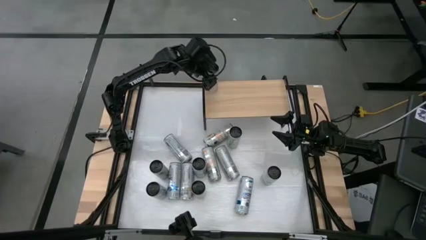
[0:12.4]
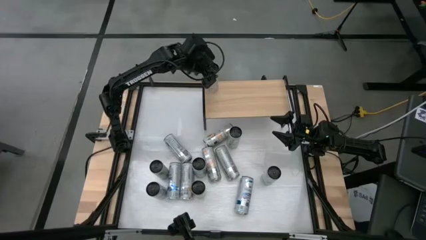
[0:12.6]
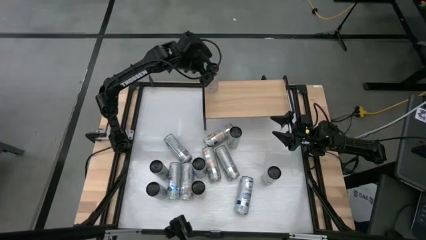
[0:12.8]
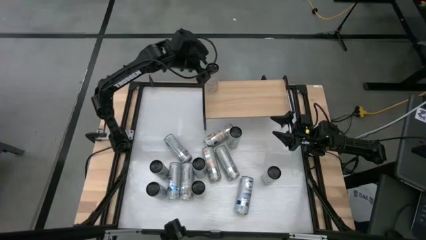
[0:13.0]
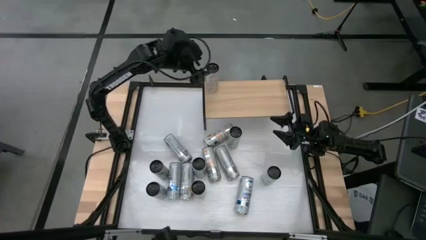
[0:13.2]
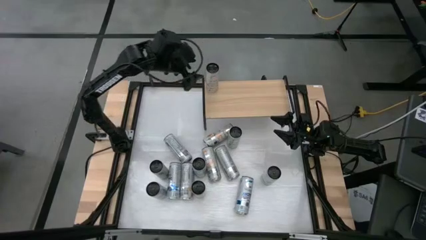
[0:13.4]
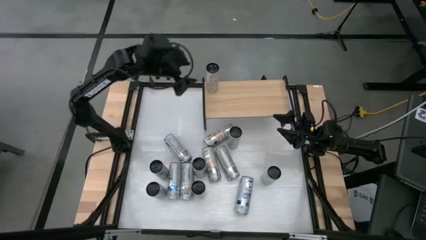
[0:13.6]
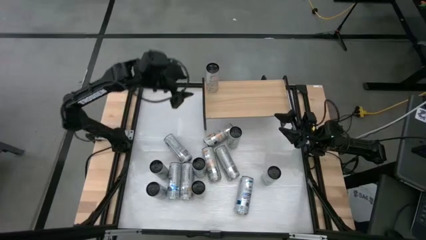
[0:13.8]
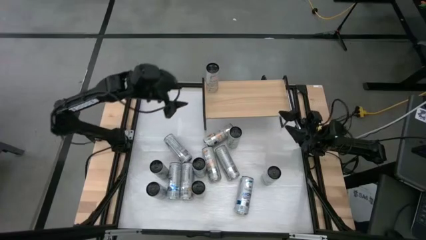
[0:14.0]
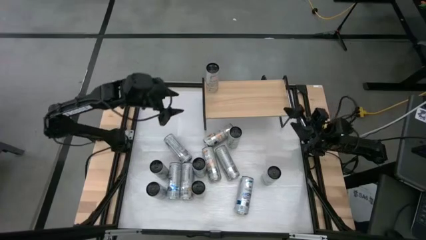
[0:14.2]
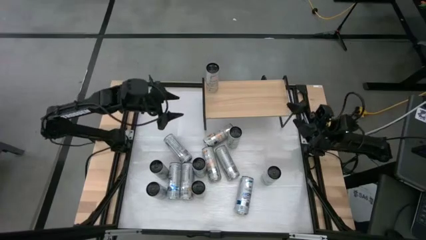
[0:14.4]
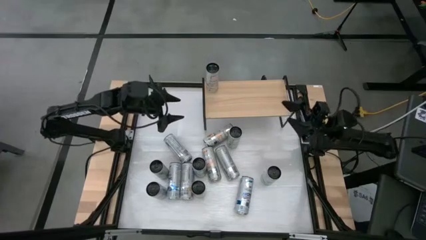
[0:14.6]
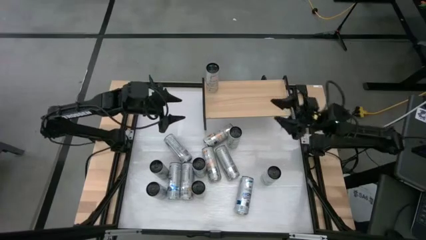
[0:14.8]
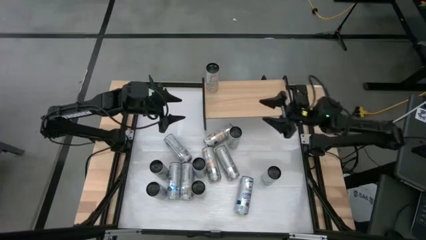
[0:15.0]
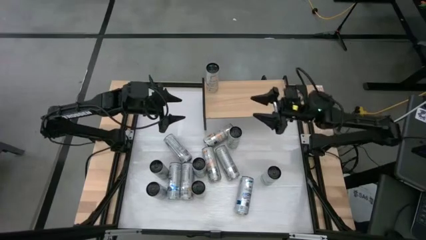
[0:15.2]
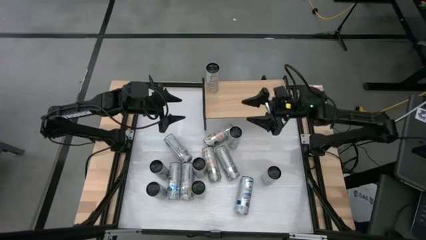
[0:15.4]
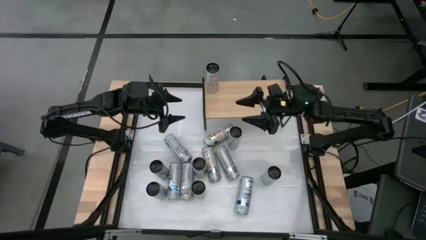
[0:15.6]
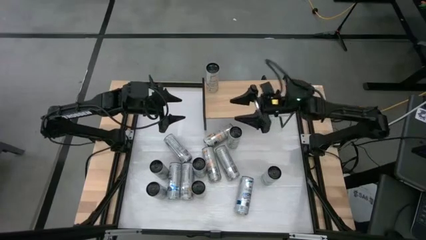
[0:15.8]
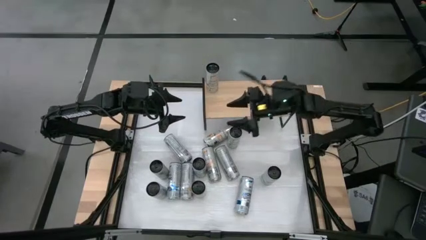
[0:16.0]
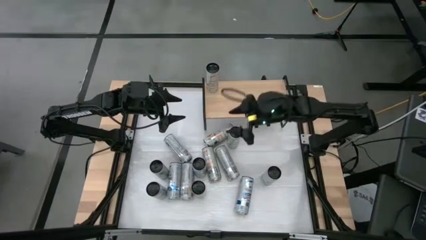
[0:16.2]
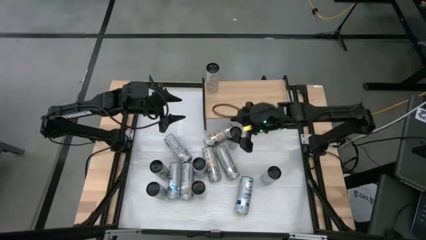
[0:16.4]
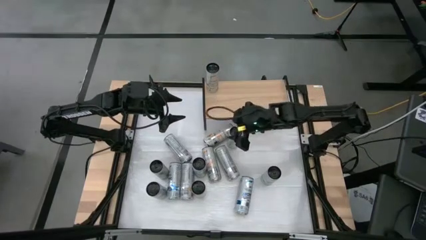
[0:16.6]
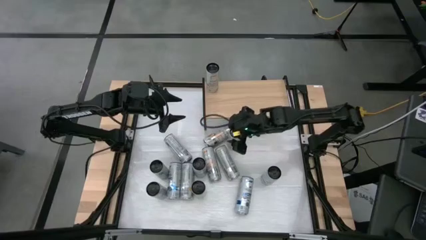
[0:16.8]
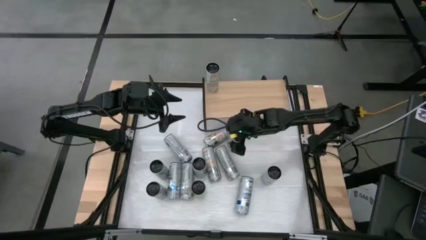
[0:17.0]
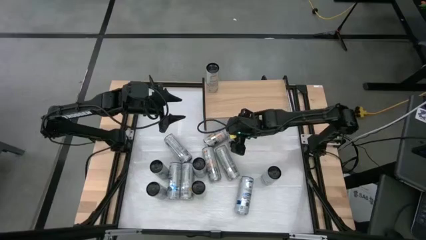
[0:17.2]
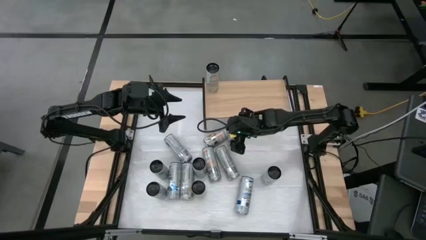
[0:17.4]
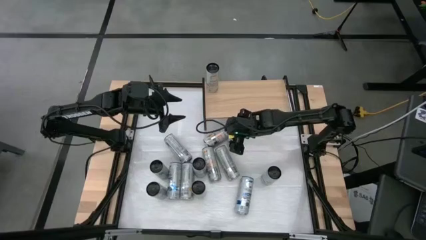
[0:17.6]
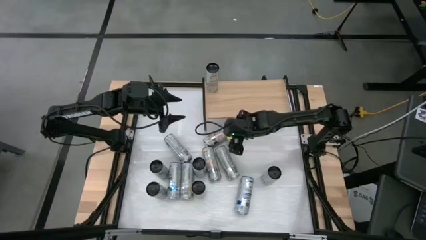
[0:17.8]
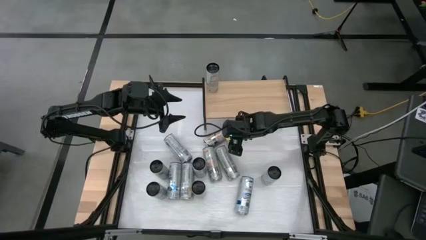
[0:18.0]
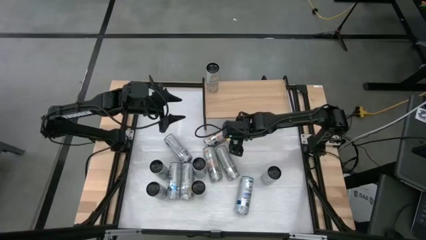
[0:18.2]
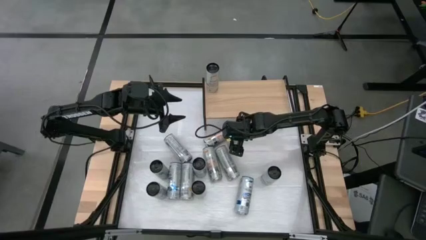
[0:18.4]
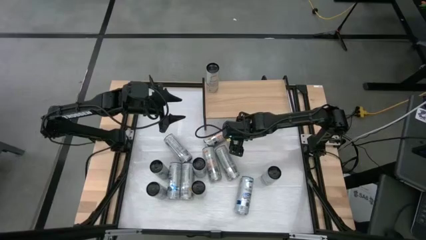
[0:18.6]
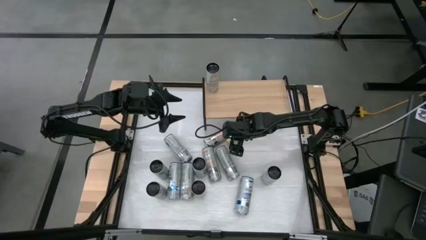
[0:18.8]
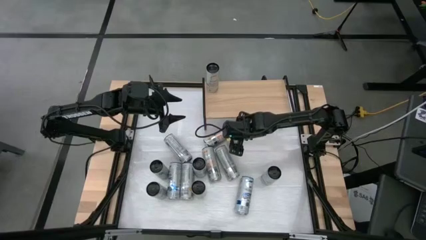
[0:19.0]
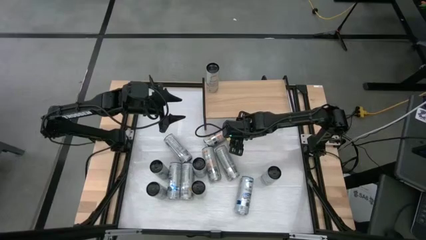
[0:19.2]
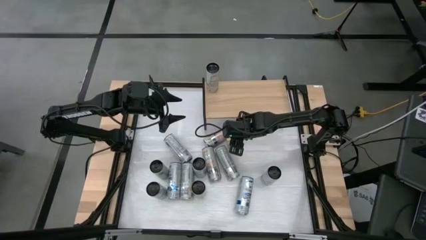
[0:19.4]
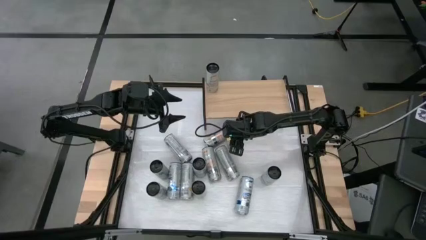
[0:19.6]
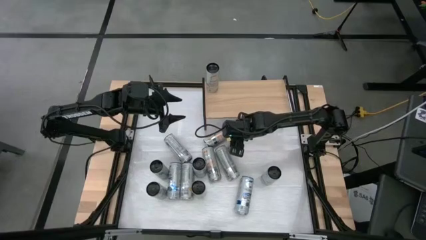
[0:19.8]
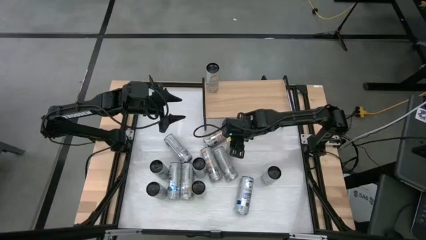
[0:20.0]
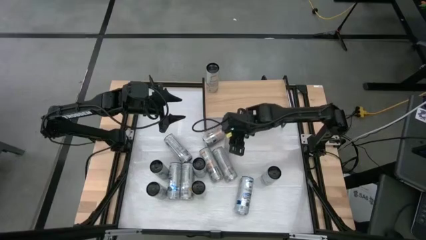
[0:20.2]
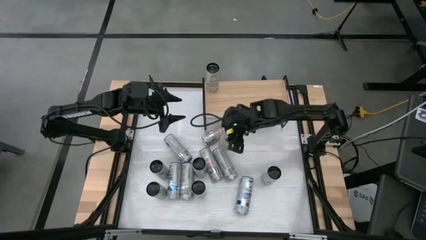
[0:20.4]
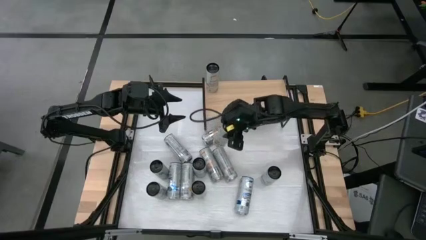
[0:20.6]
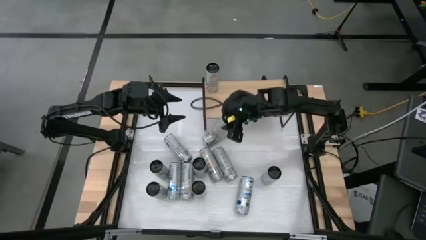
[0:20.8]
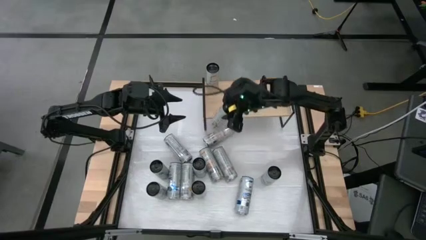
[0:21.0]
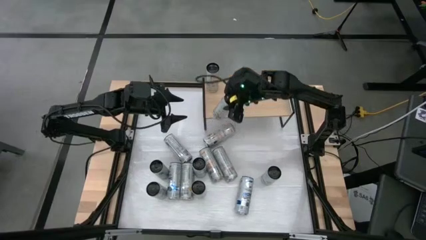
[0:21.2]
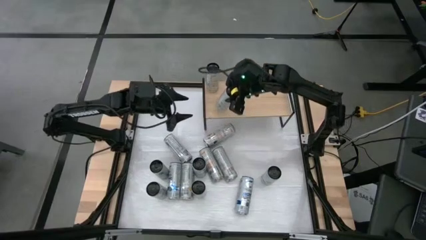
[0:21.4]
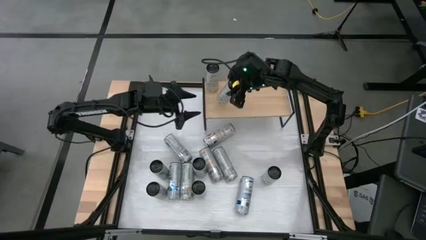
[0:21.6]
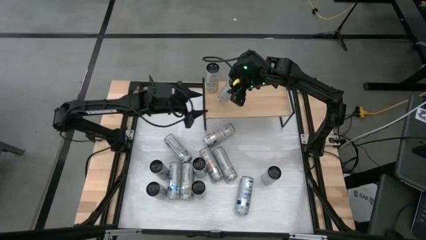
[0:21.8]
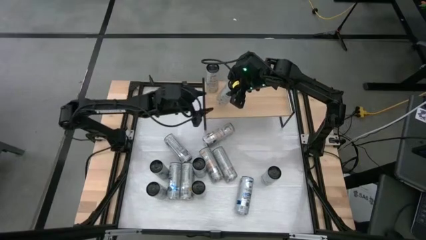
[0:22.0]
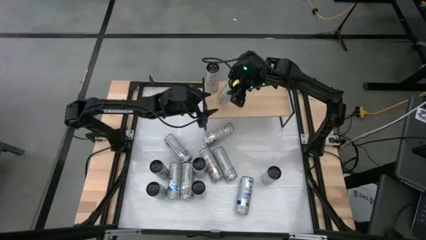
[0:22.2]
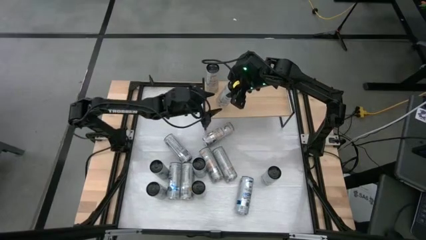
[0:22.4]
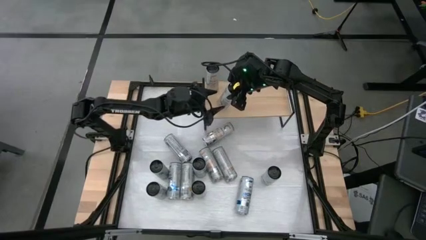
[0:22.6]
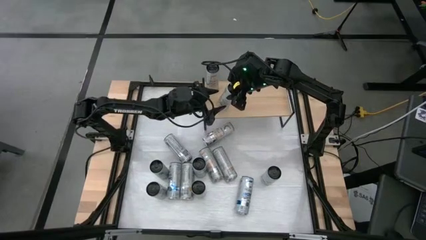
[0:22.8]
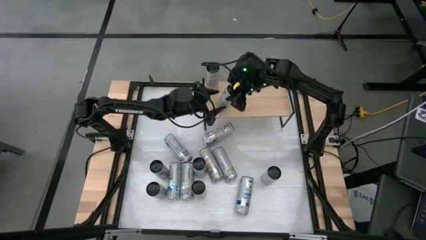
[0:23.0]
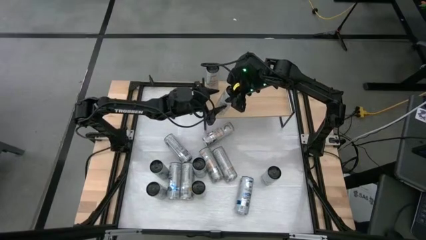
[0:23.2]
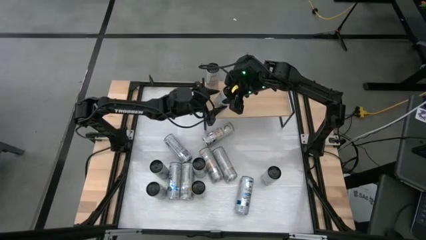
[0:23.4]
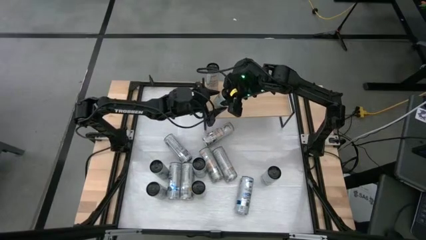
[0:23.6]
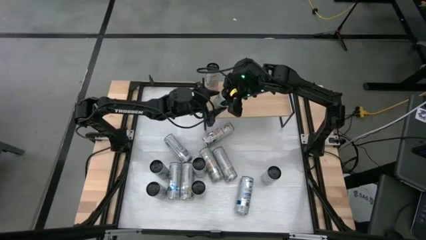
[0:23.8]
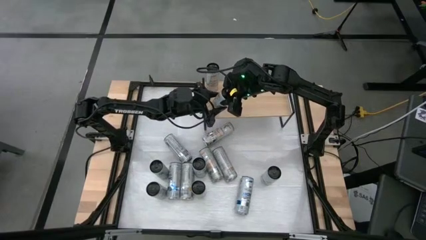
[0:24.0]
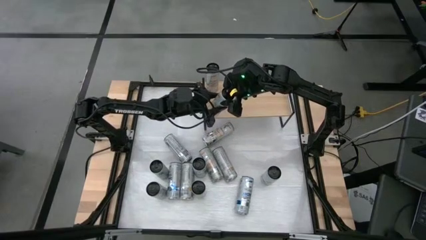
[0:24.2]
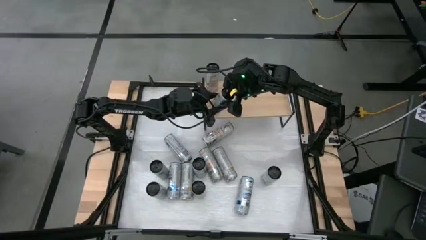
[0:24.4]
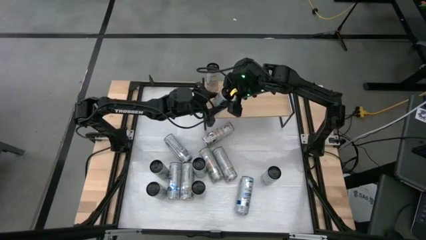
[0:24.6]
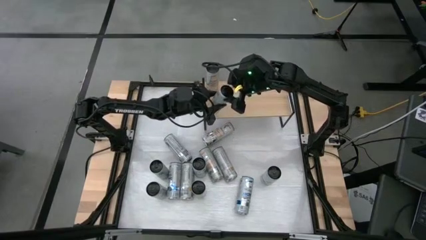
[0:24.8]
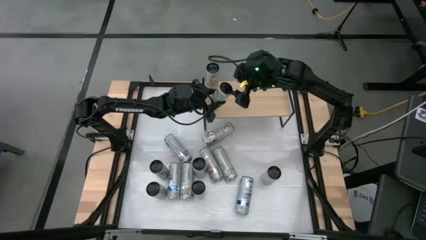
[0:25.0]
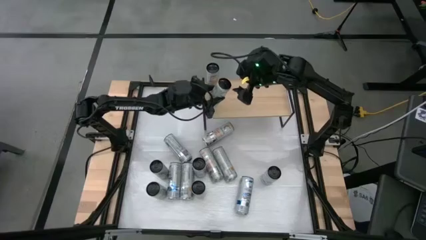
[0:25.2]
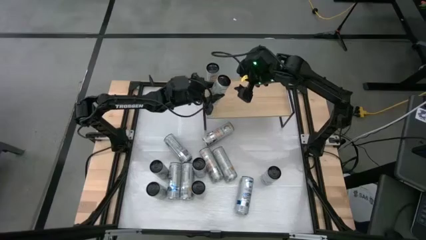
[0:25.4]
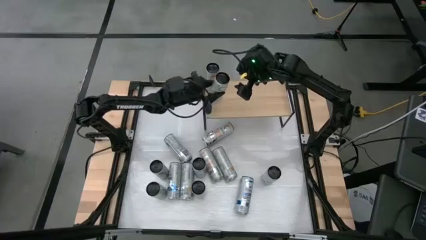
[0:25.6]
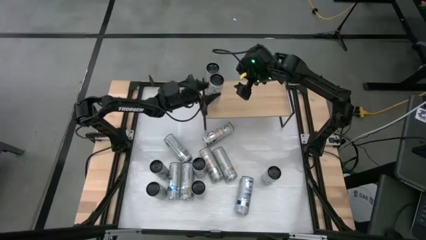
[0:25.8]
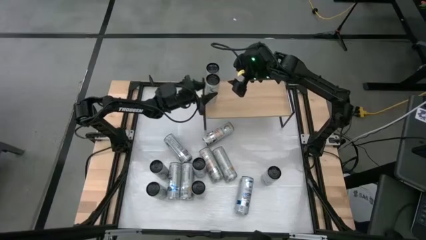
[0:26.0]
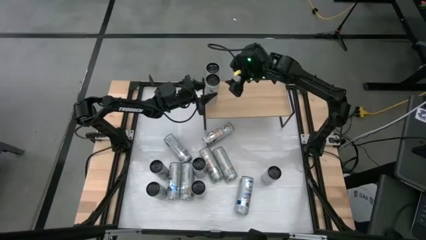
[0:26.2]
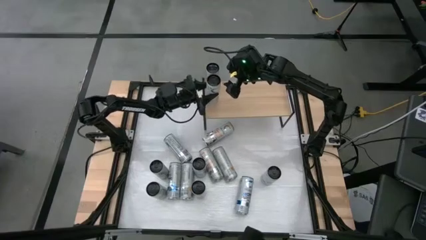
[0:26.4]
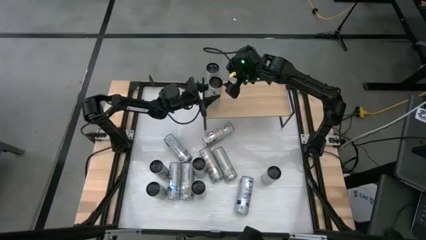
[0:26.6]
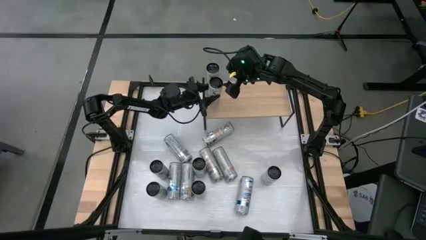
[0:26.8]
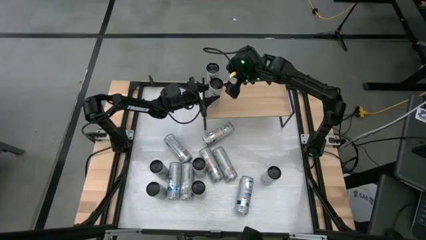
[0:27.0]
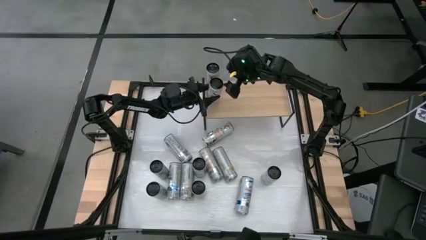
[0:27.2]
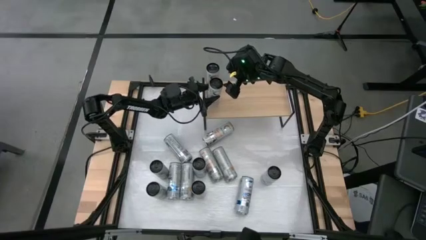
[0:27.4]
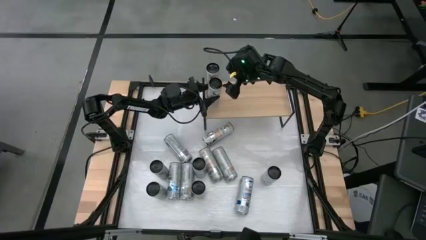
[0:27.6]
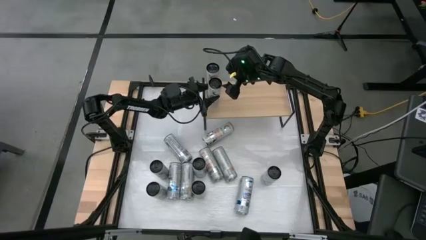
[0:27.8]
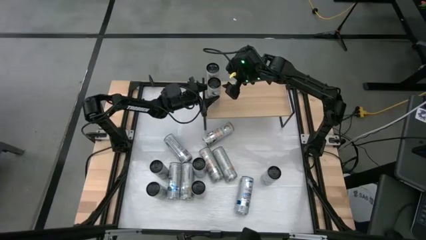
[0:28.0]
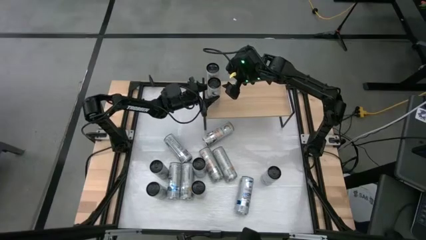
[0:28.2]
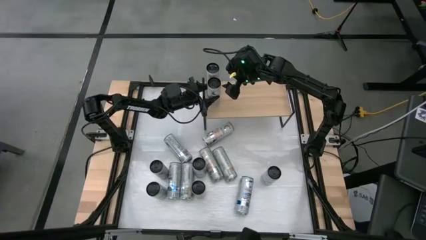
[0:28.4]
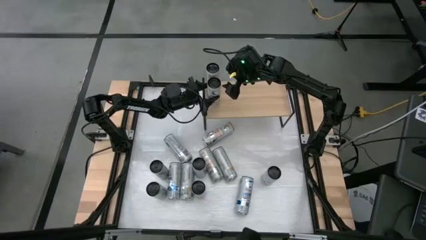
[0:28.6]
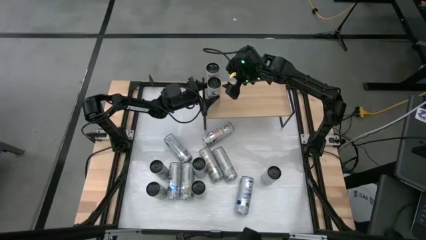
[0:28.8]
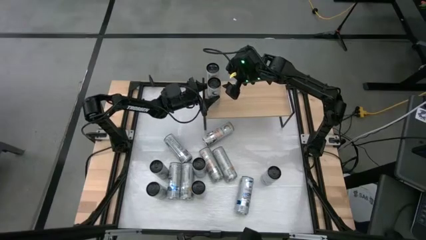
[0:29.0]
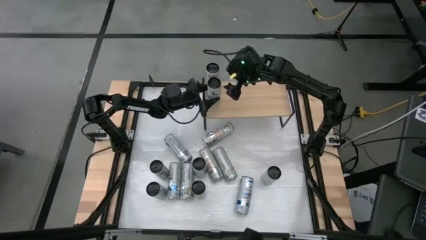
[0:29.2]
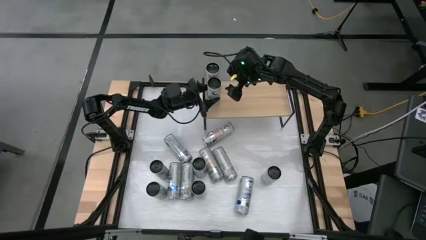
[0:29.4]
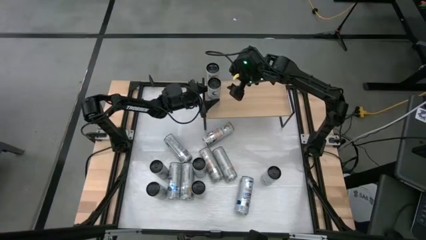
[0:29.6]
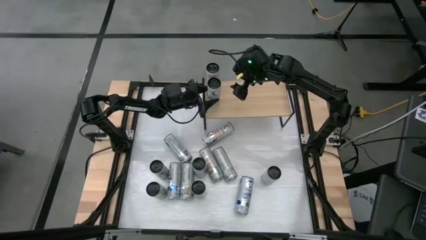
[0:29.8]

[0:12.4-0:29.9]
Task: Place canned beverage on shelf
Put the orange soda can on the shelf aligned with the other orange soda can
